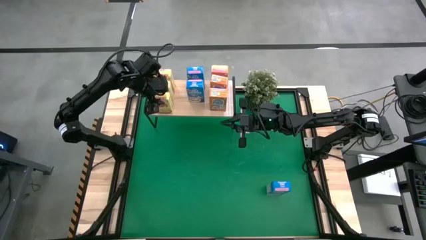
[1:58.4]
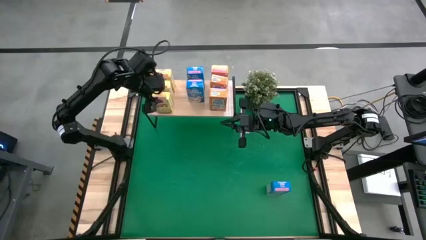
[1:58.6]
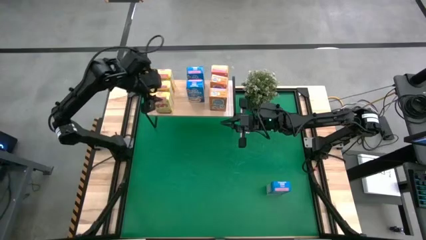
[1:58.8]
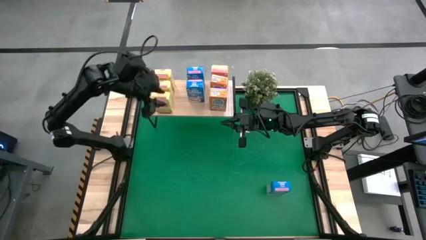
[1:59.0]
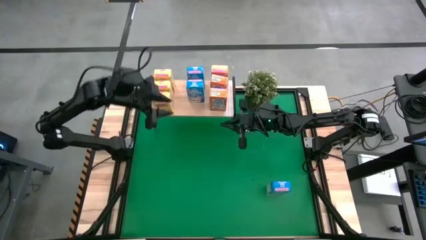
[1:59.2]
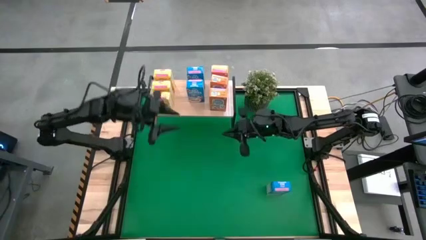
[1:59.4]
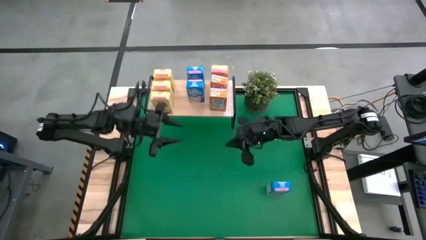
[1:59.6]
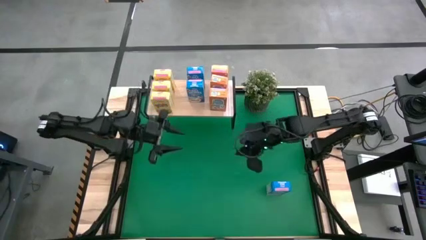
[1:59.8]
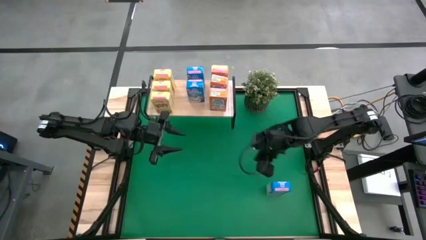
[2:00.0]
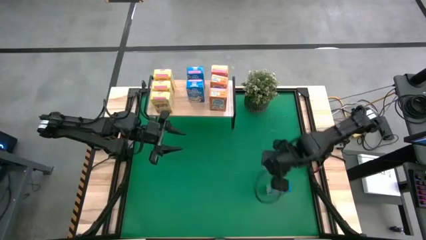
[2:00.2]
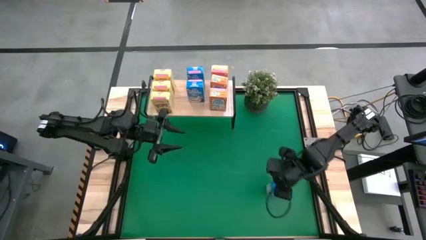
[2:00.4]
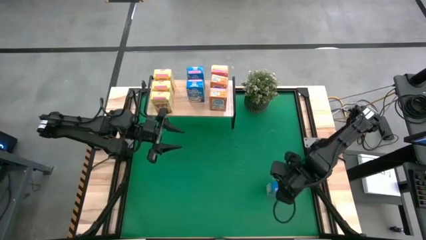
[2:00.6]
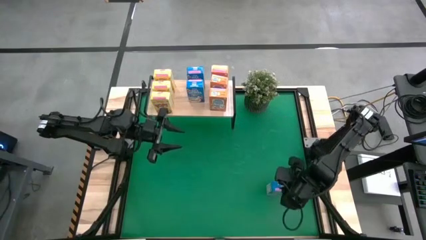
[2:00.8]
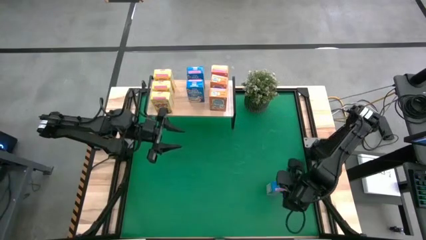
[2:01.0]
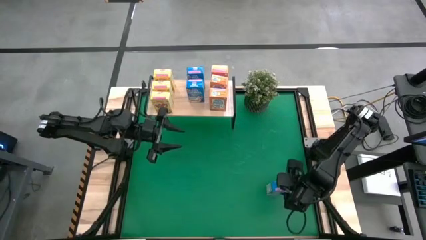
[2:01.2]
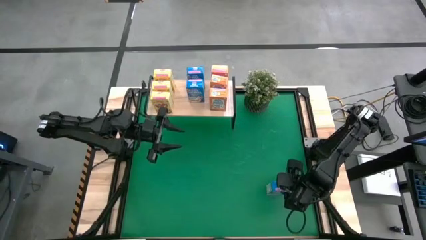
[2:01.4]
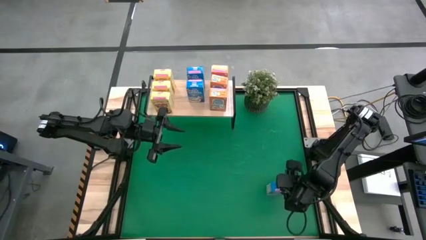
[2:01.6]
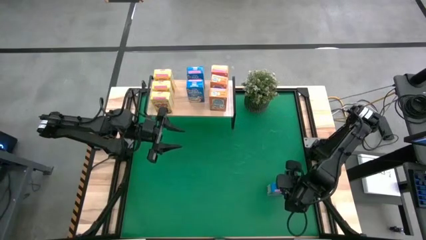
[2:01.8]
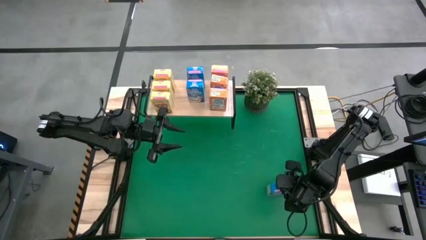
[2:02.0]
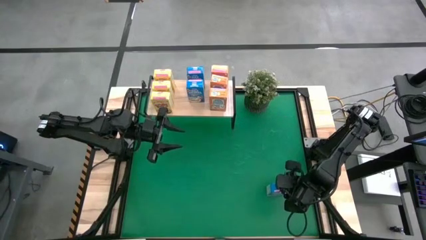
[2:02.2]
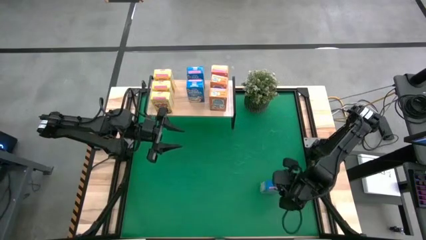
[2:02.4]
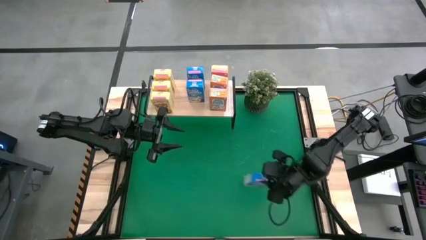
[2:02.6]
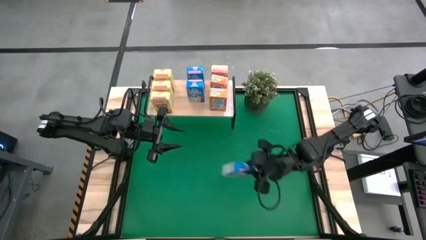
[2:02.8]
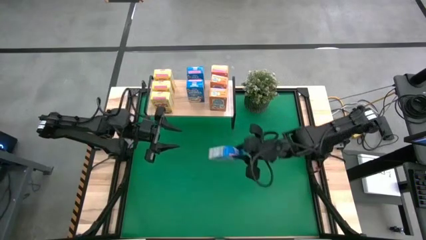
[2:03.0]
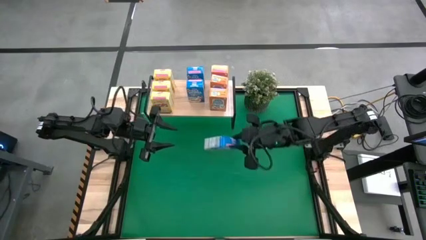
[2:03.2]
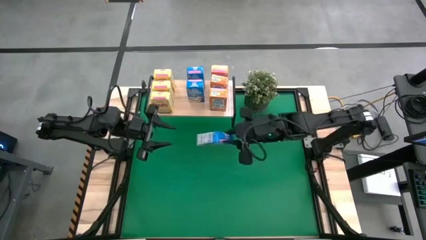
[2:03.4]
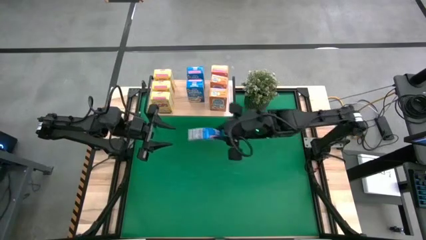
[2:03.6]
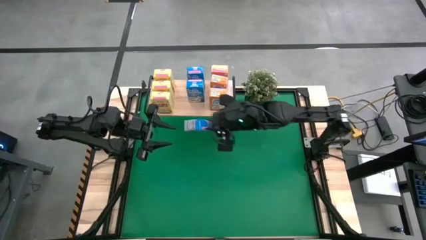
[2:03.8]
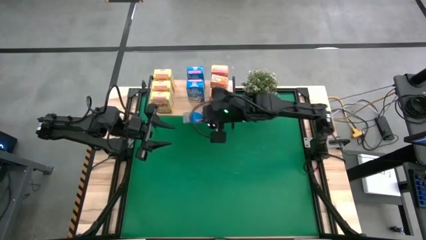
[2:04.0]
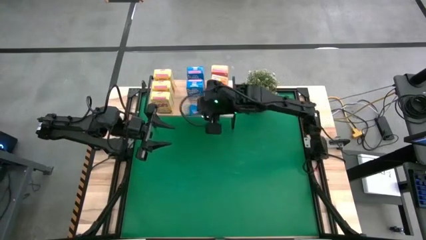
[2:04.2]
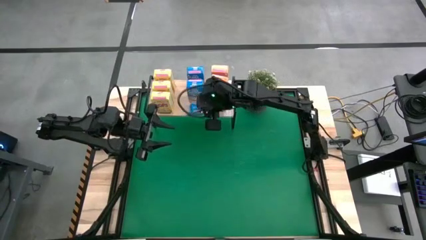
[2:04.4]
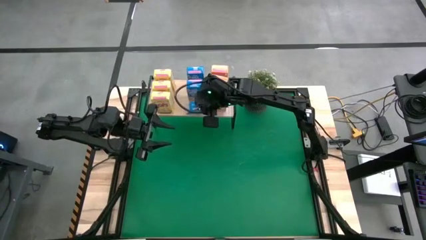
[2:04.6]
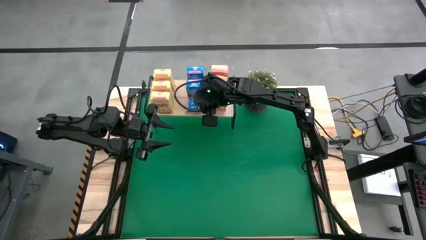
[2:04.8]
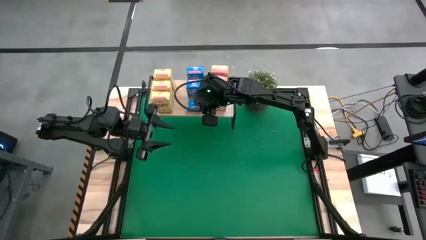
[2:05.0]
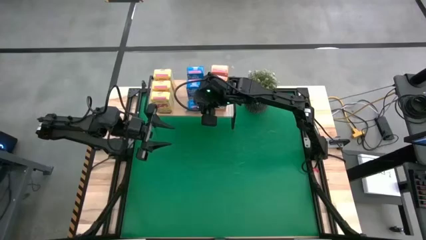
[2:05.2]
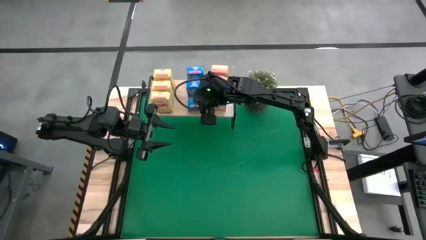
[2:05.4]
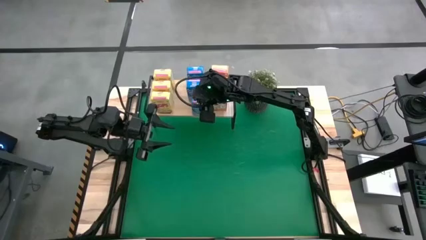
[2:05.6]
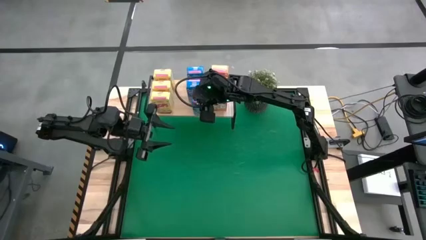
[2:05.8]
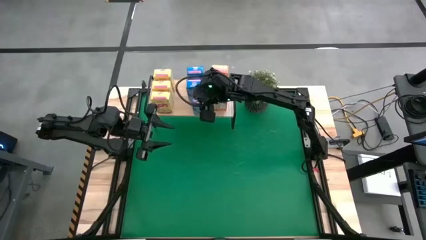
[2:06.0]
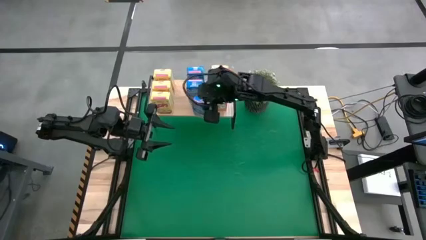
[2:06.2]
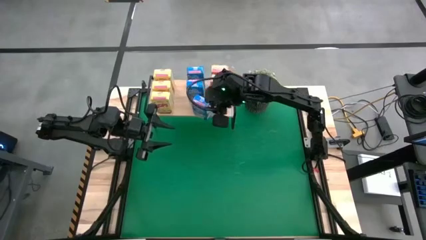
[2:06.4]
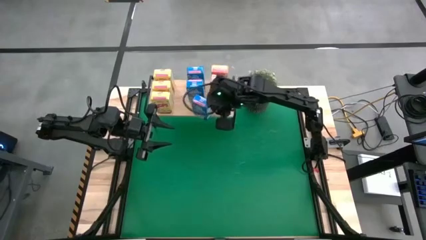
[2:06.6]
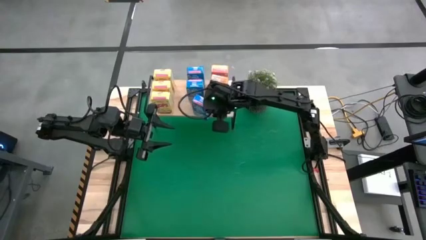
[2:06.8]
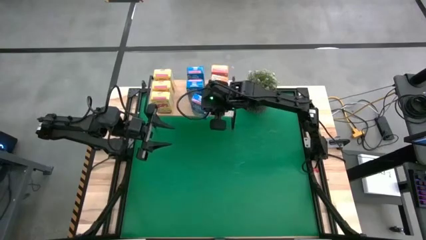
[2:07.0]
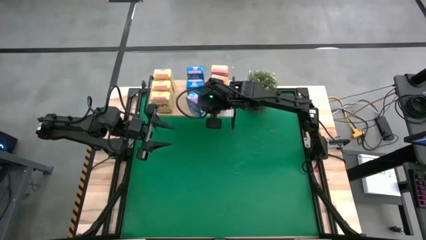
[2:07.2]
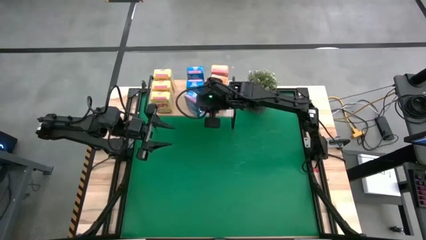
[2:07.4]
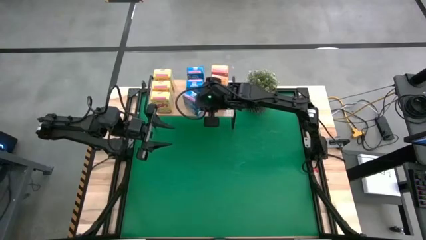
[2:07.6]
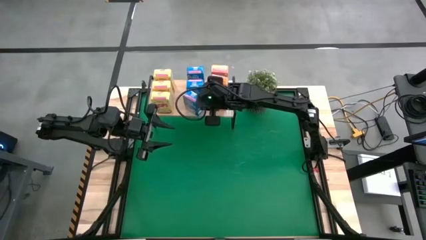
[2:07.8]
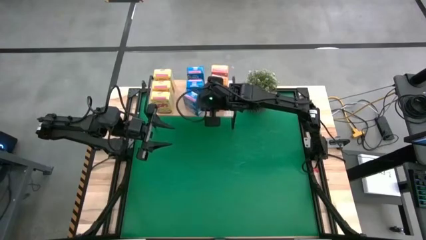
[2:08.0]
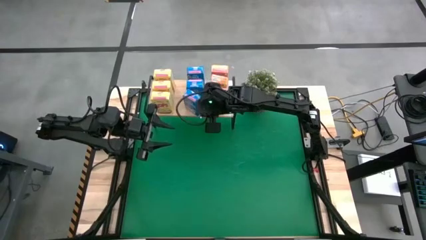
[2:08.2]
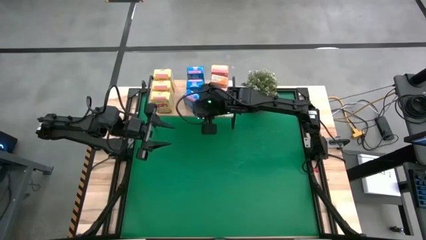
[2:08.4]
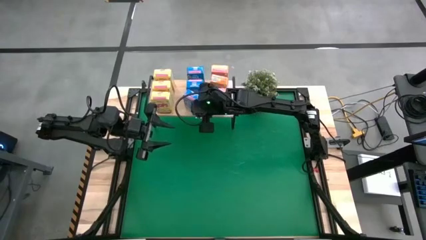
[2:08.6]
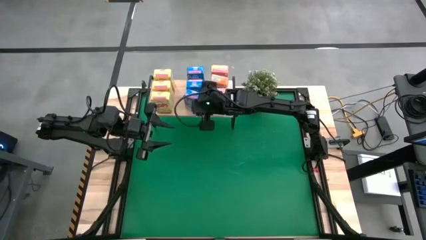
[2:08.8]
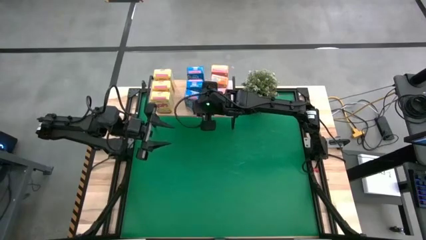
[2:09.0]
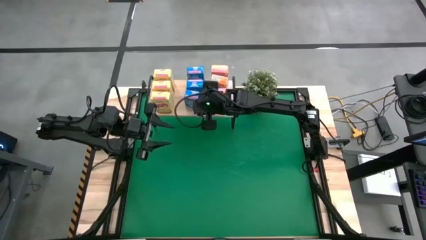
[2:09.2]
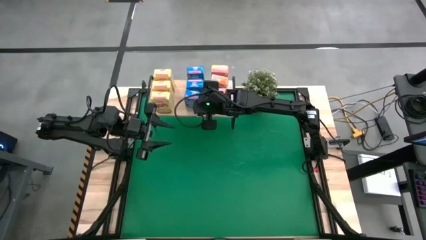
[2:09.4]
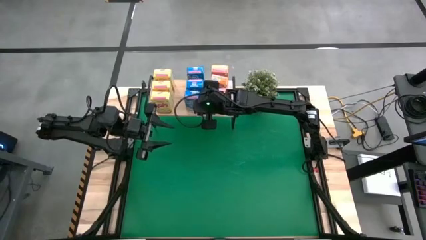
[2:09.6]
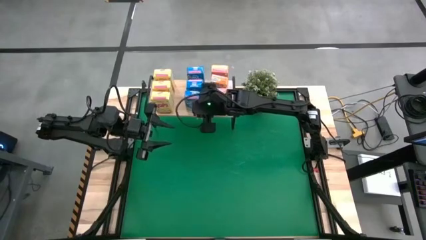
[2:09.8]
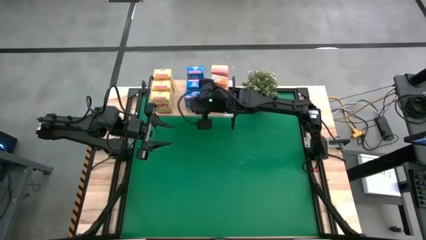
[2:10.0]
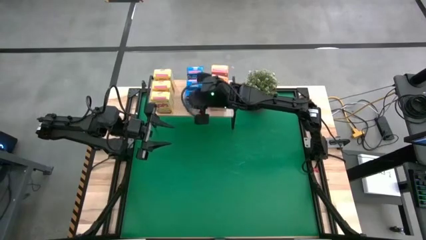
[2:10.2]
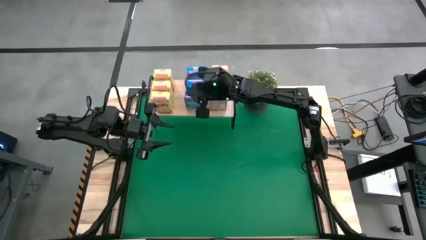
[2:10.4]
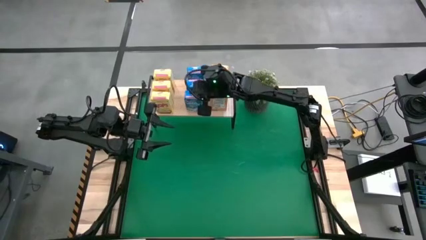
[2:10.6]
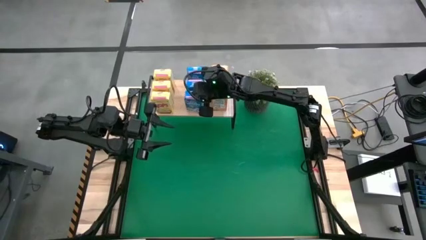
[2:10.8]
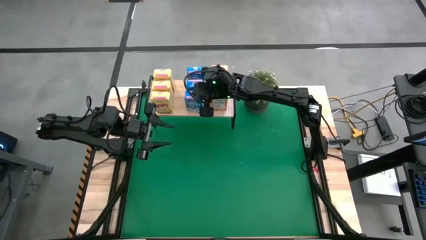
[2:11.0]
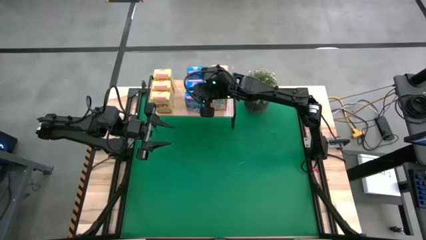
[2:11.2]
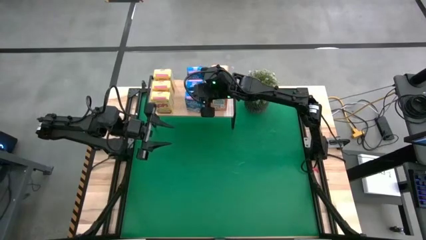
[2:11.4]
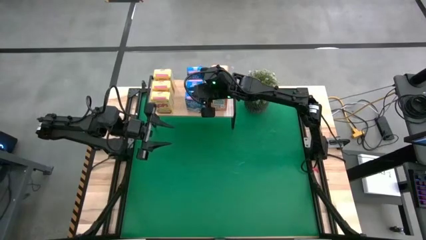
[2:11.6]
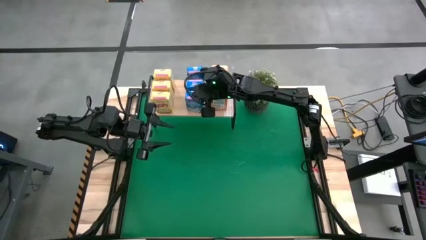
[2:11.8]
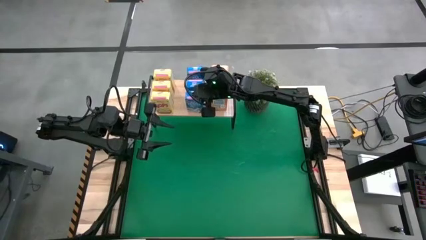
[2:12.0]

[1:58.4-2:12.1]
Task: Stack cereal on shelf
Put the blue cereal box on the shelf

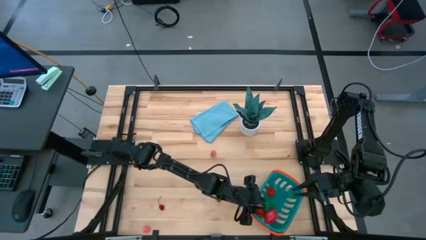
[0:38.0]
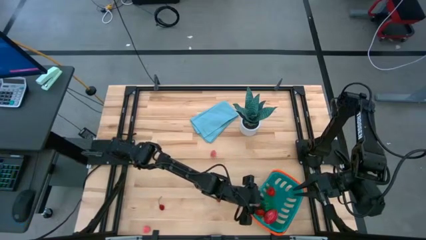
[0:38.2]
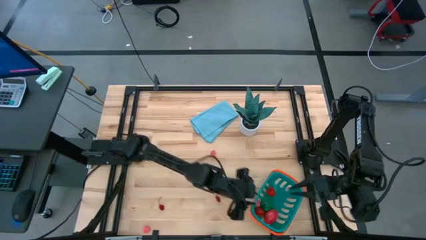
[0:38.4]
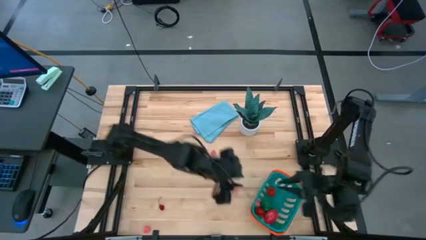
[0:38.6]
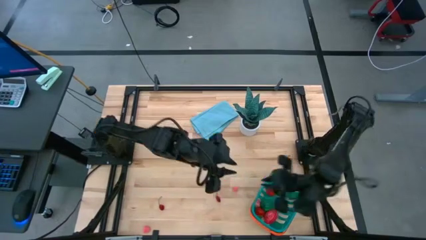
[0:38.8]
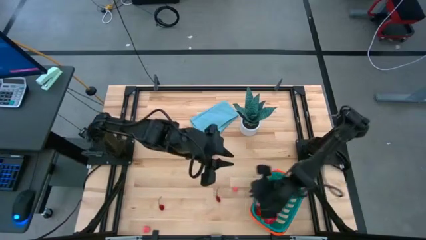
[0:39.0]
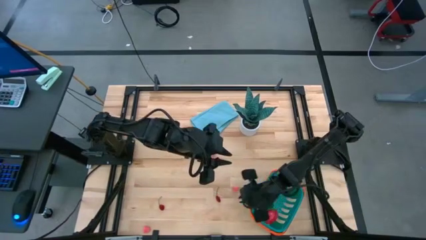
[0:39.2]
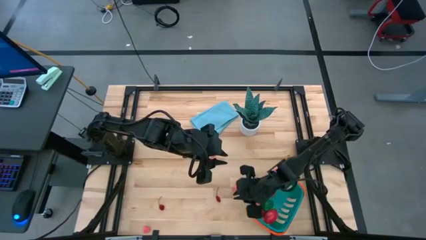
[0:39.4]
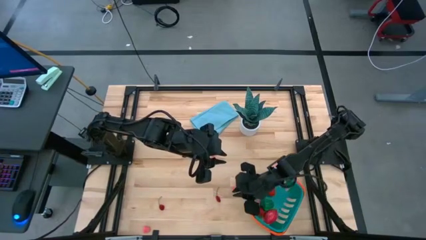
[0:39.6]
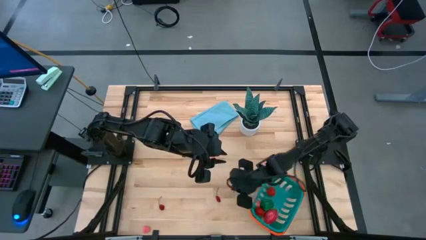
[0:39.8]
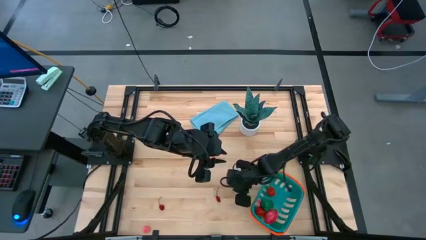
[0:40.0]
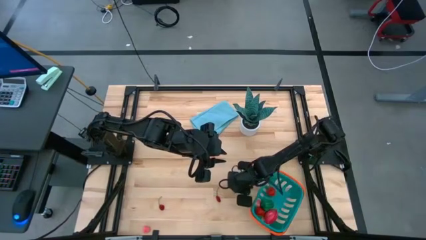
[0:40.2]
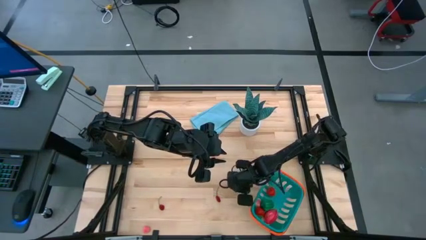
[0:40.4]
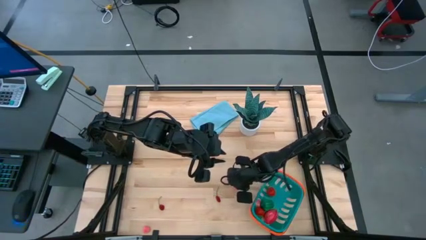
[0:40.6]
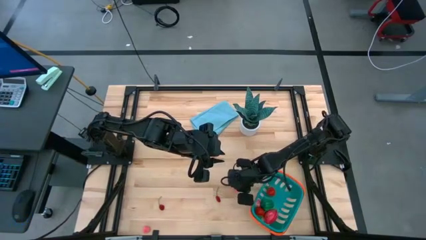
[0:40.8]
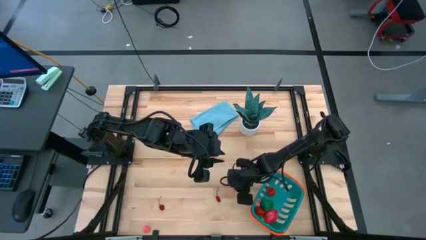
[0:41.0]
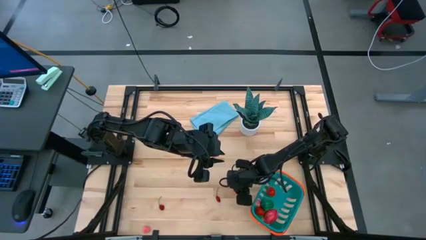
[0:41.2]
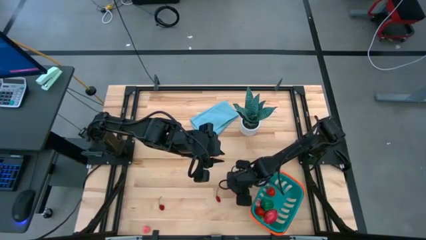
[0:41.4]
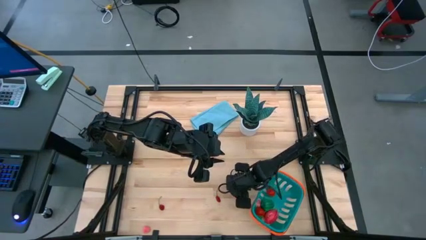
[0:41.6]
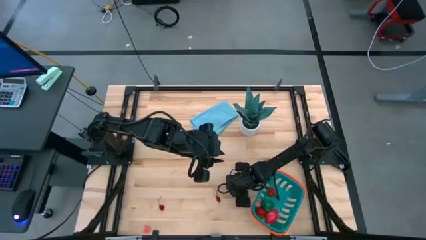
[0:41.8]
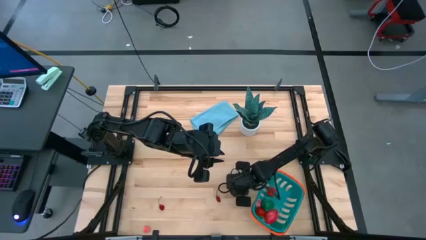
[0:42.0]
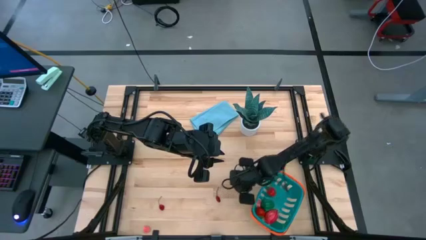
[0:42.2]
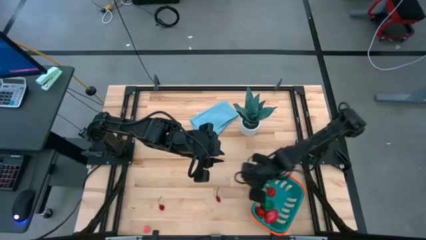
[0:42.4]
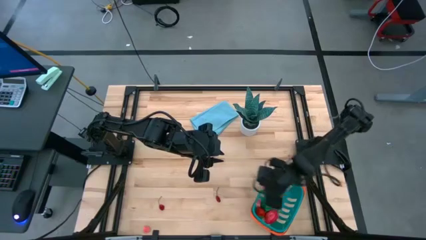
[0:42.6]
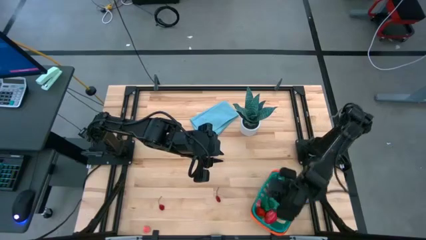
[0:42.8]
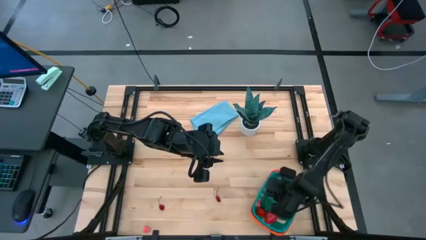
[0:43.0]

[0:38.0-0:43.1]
Task: Pick and placing Produce into tupperware
Put the middle apricot into the basket
